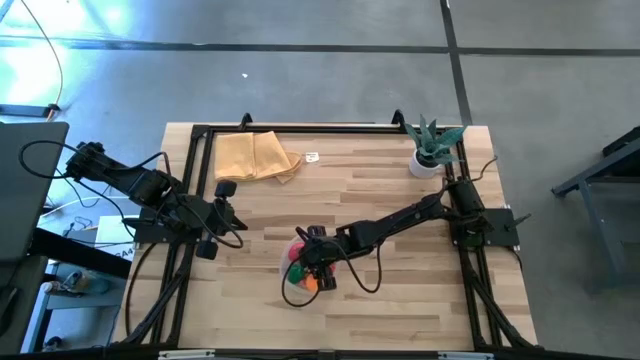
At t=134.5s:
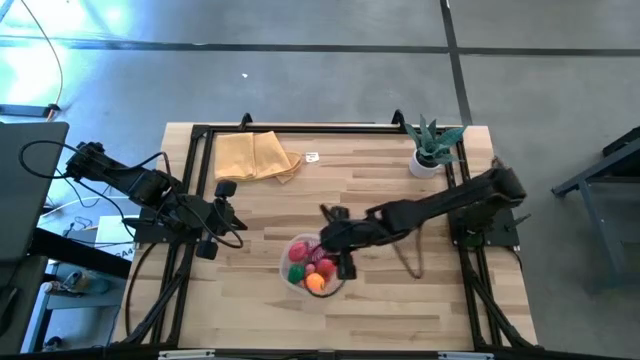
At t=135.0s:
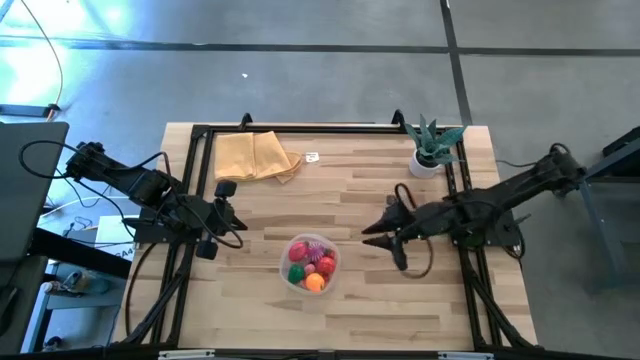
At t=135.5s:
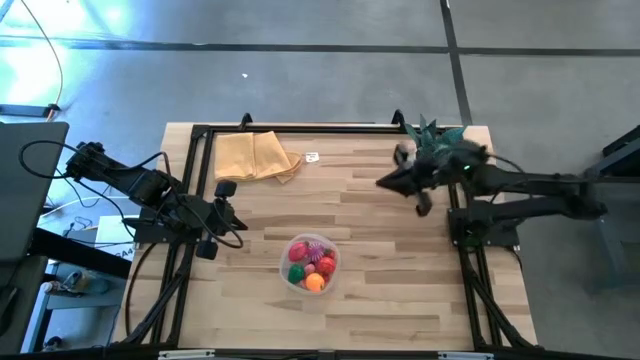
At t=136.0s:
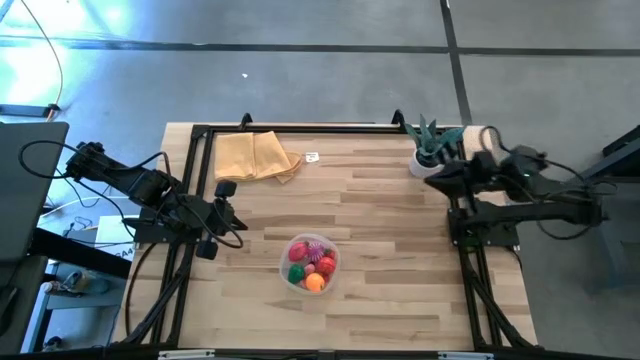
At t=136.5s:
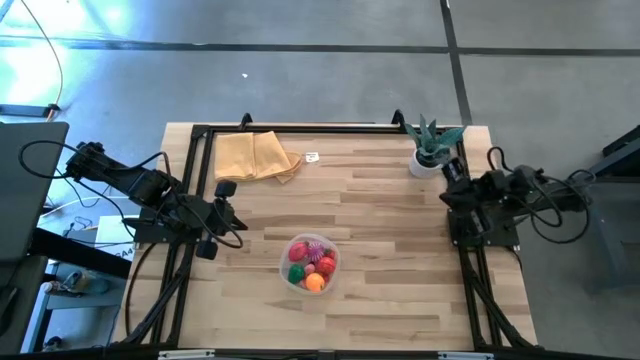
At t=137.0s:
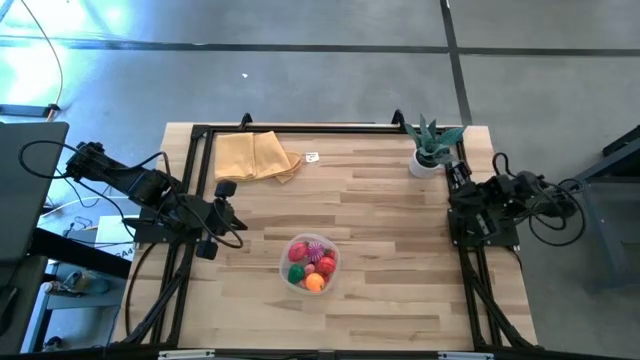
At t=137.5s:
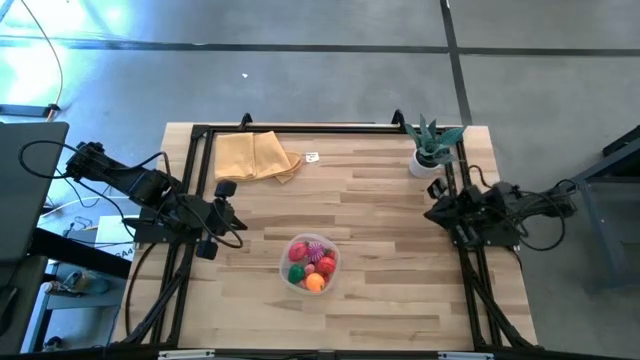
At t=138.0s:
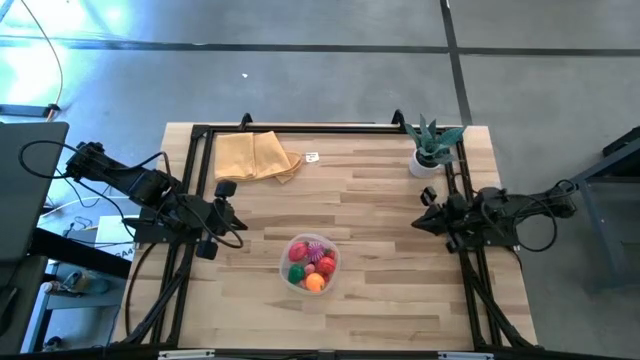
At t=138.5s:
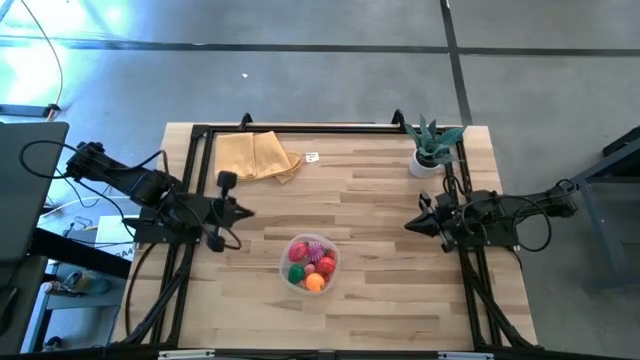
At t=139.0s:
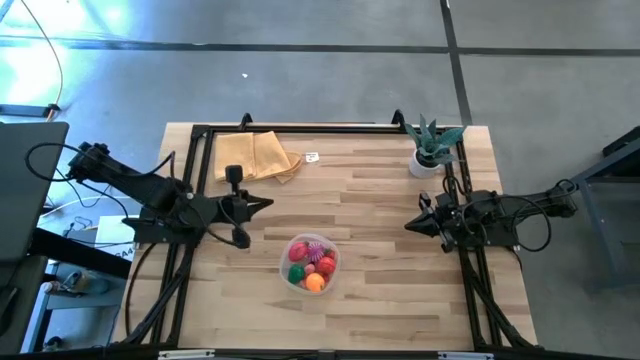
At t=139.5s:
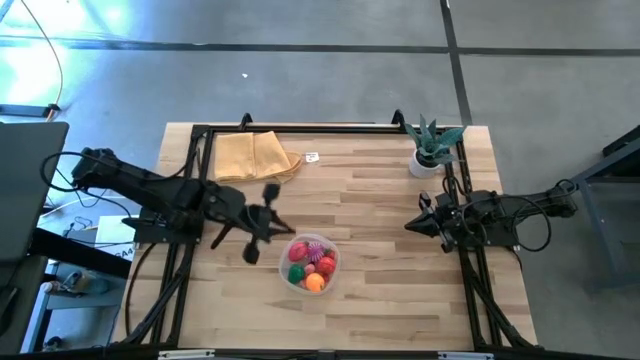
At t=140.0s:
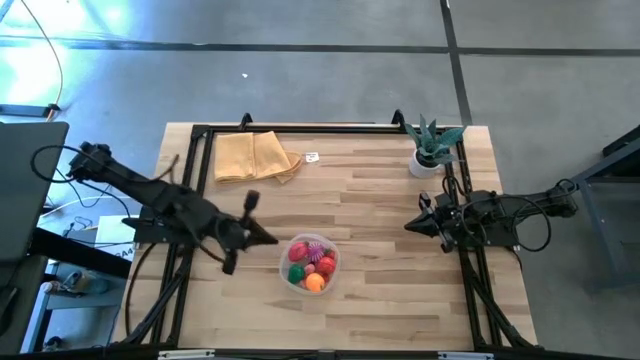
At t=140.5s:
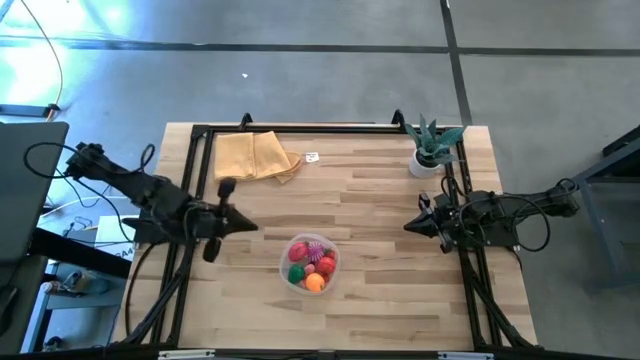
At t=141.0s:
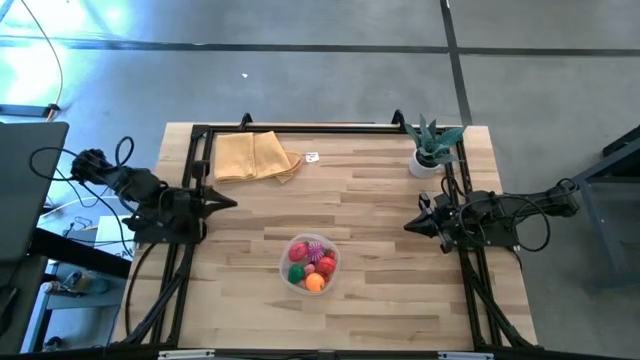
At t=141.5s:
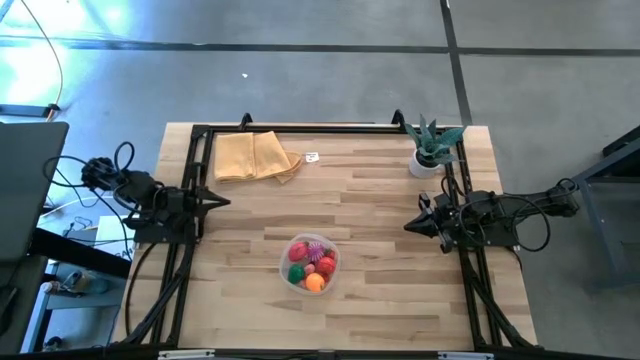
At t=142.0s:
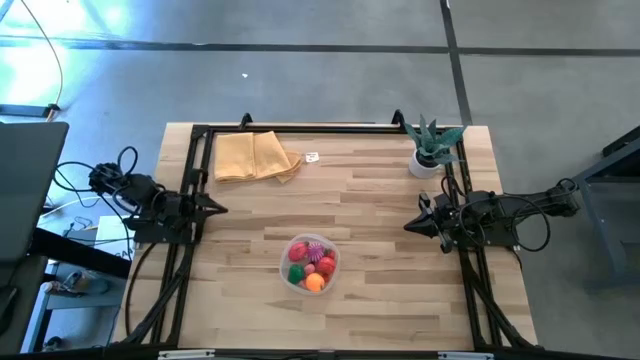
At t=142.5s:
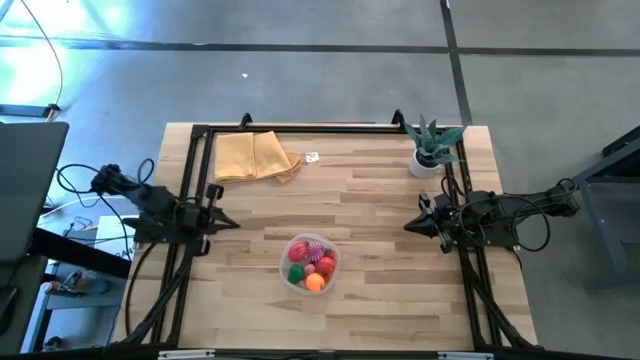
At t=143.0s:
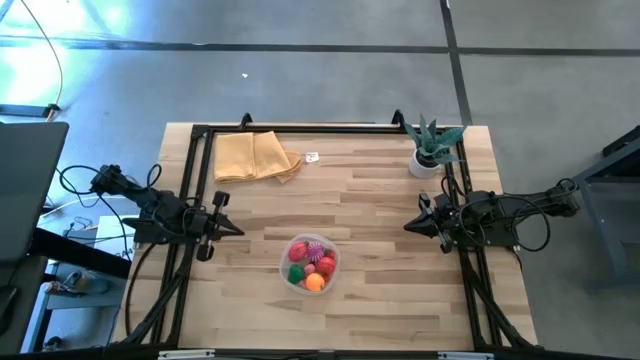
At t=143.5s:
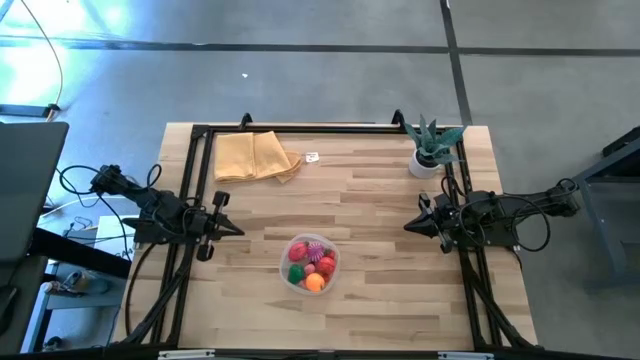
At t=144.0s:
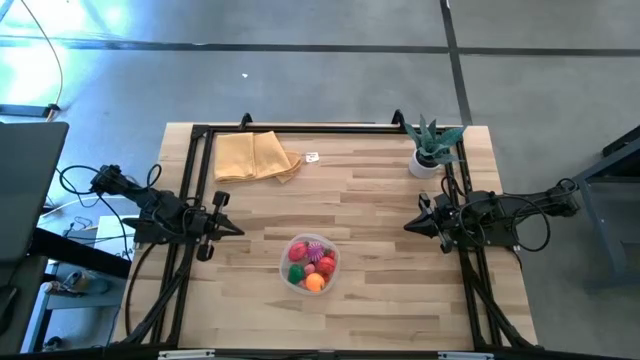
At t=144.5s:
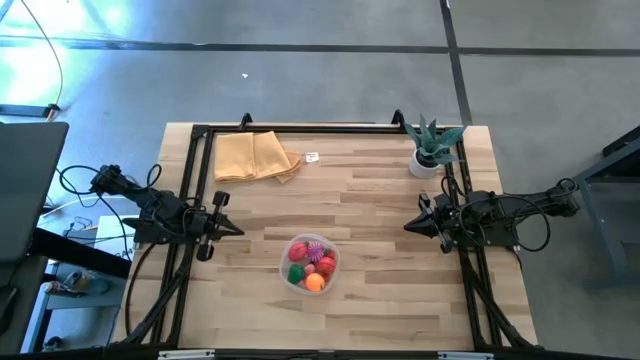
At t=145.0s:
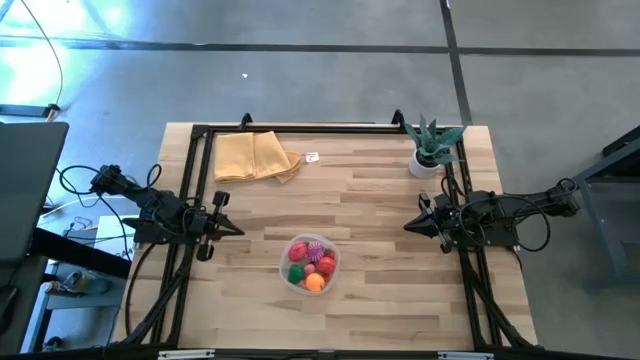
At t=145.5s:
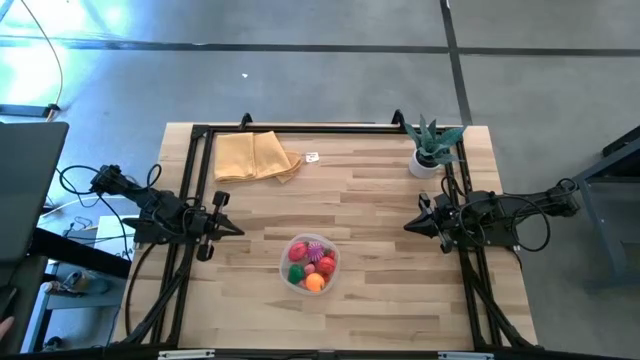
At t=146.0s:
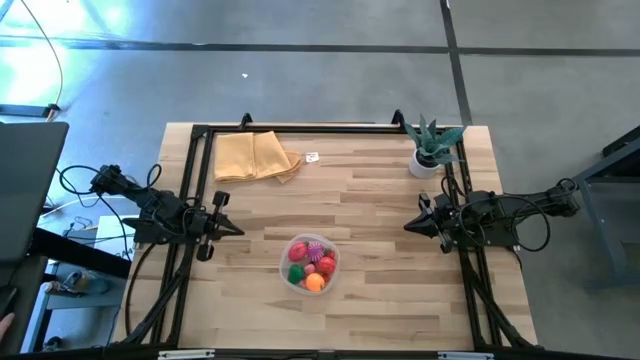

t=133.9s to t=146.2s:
Task: Pick and placing Produce into tupperware
Return to Home Position

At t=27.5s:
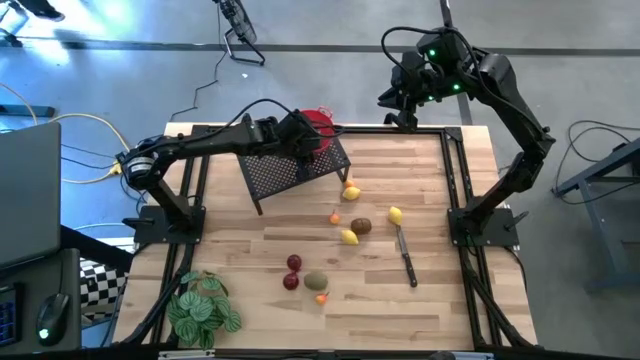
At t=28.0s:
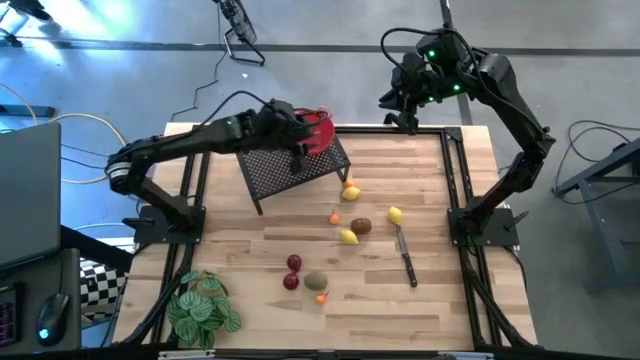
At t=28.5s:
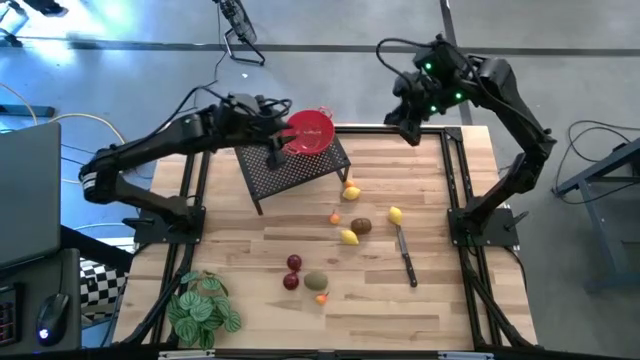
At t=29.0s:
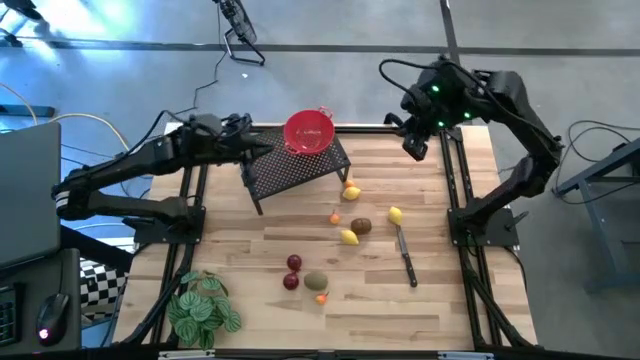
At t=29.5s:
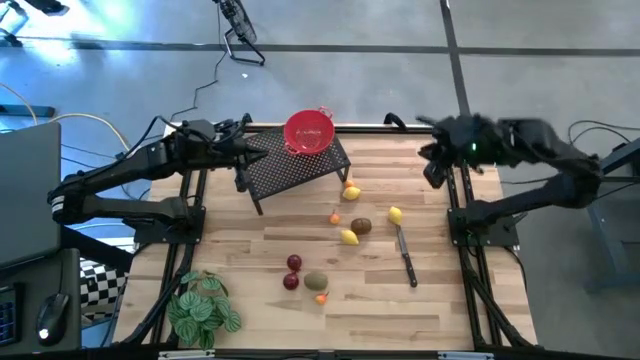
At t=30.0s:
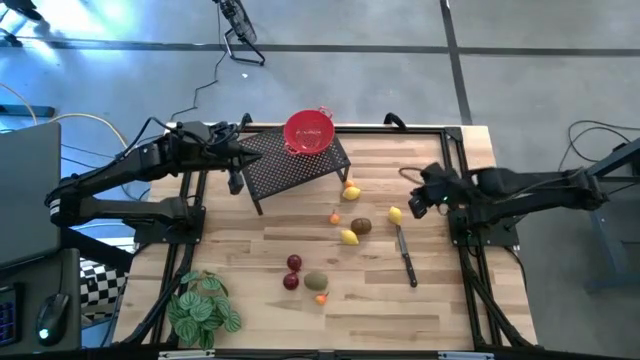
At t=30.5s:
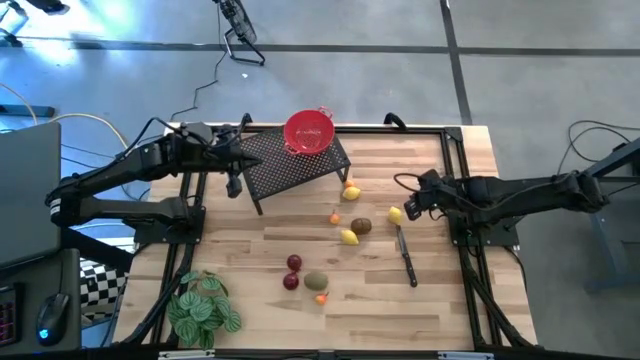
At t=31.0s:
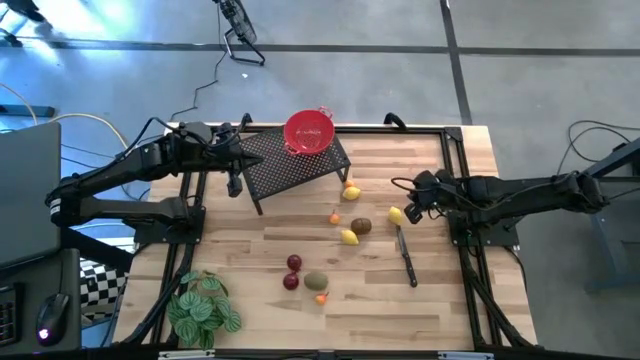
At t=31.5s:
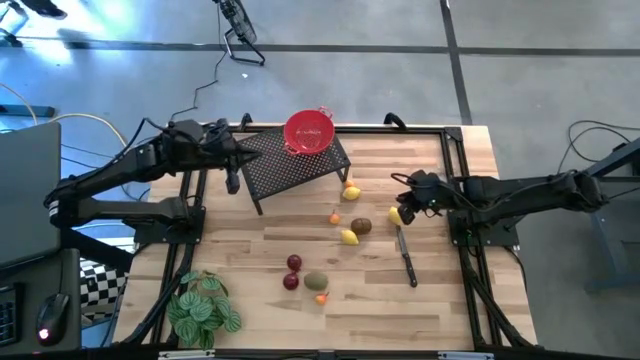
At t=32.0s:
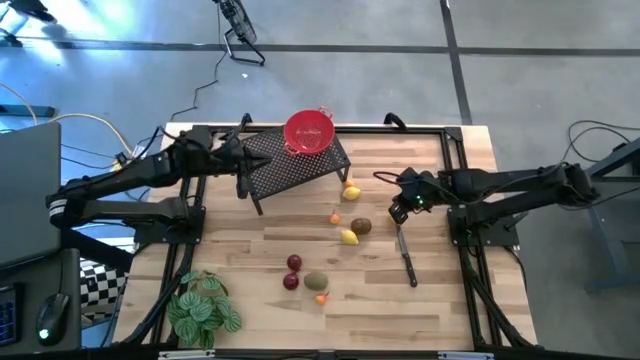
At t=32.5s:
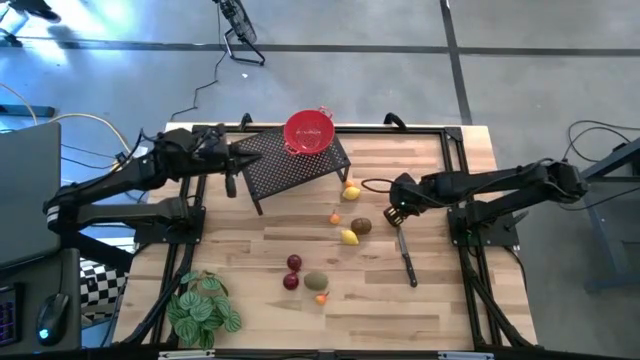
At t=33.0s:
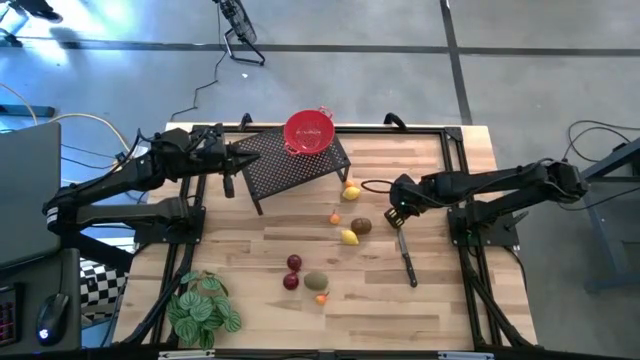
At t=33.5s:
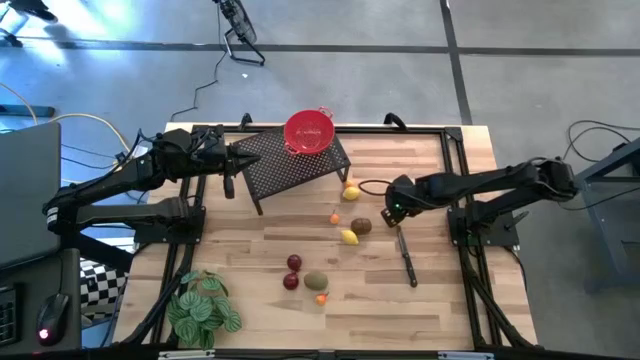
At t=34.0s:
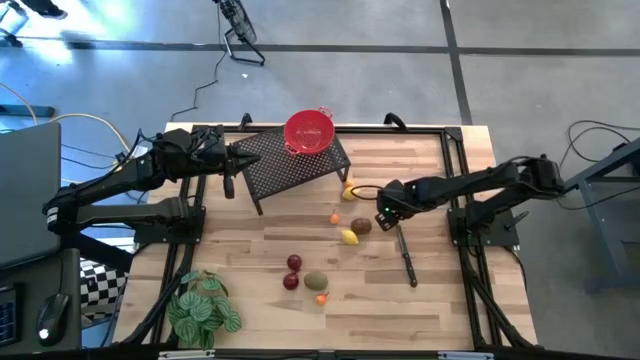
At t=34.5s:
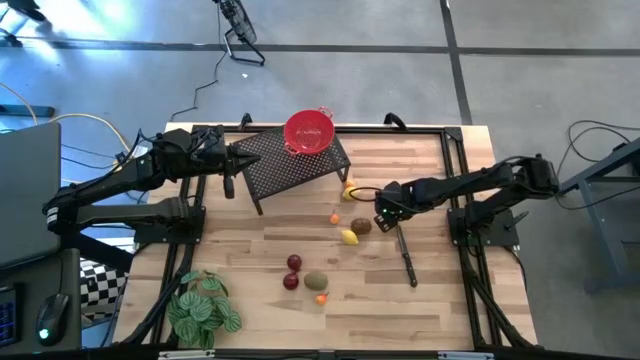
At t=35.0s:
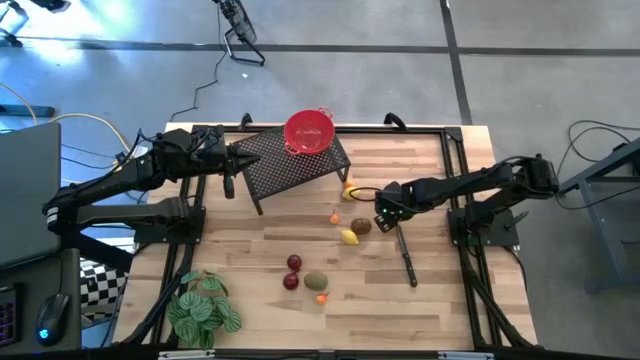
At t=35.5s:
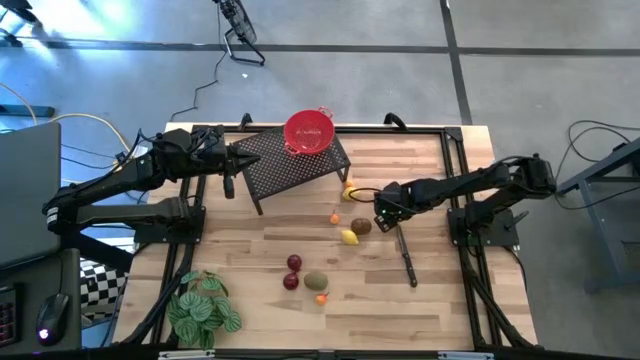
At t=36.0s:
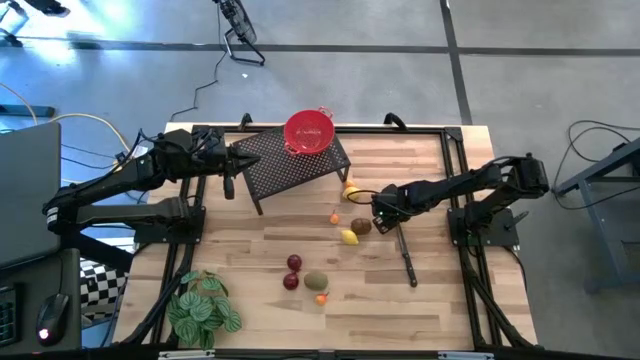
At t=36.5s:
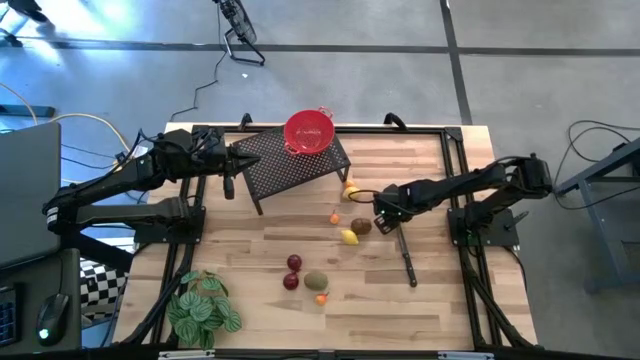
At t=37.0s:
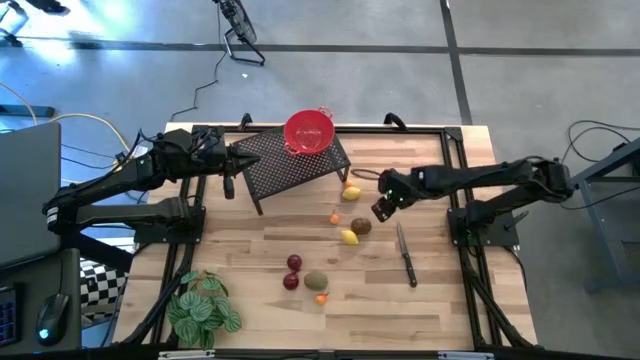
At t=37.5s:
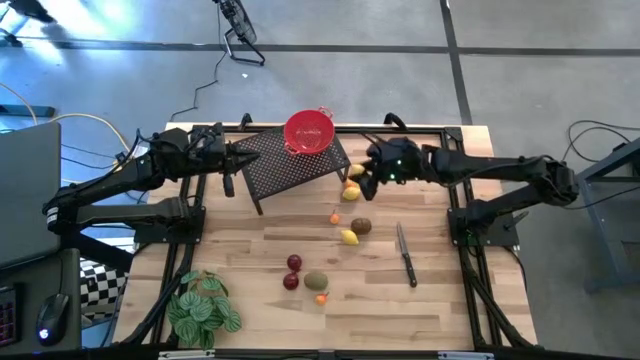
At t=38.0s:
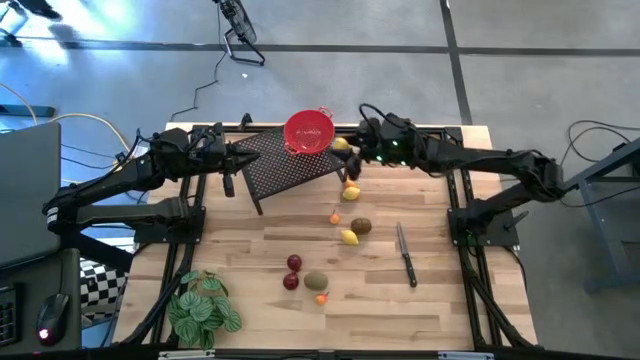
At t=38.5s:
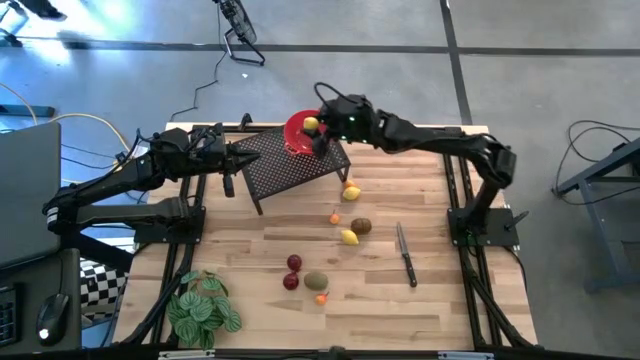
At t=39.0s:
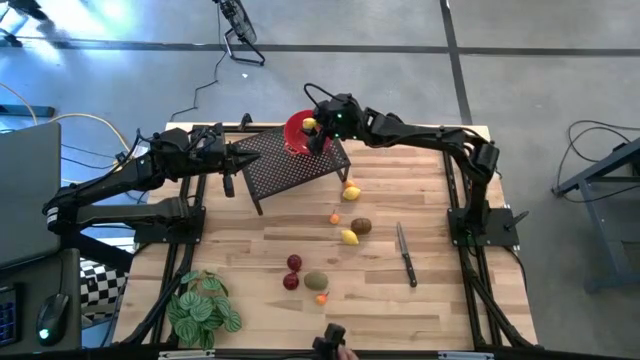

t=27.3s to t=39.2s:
Task: Pick & Place Fruit
Put the middle lemon into the red strainer bowl on the shelf
